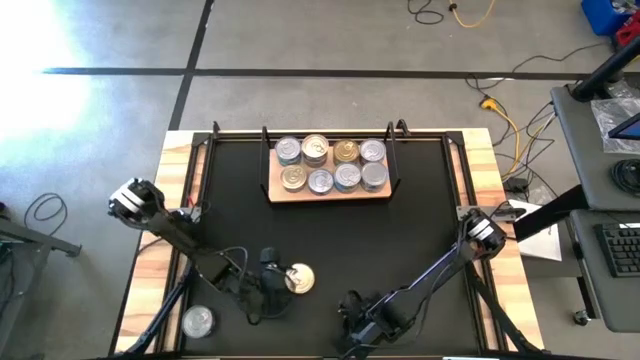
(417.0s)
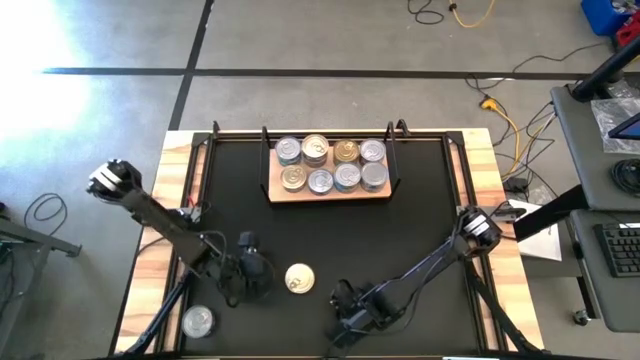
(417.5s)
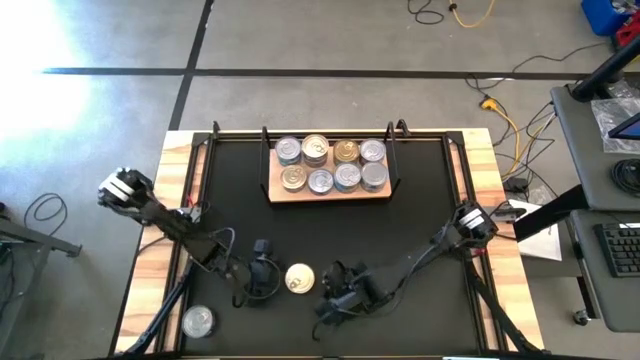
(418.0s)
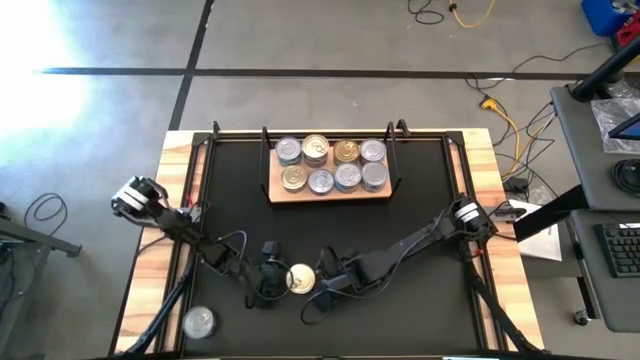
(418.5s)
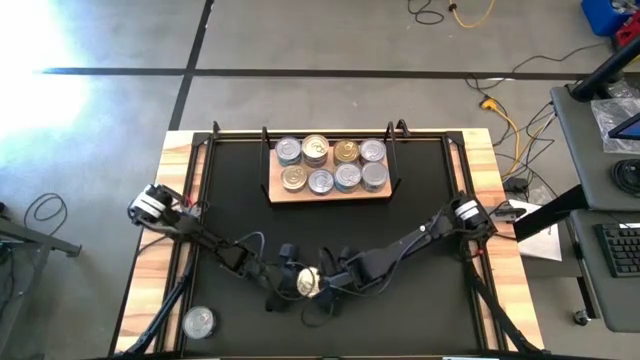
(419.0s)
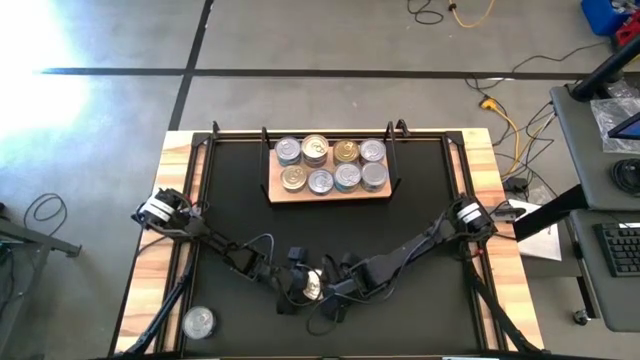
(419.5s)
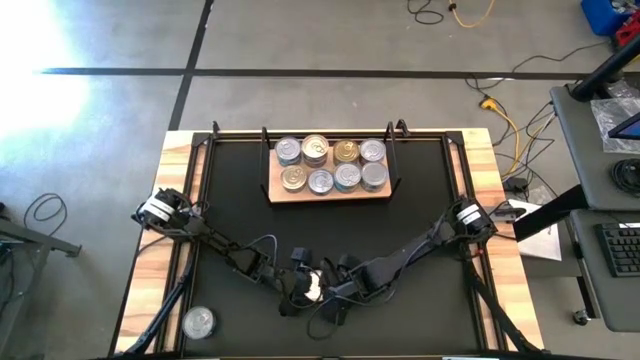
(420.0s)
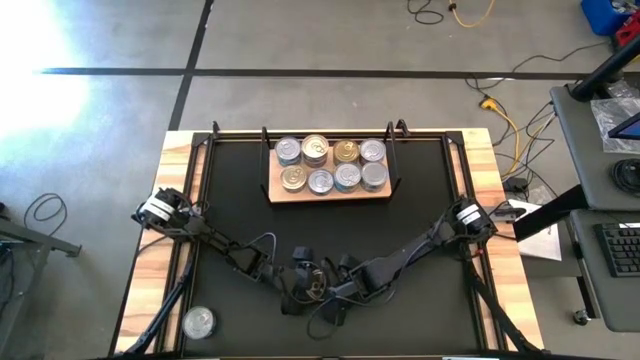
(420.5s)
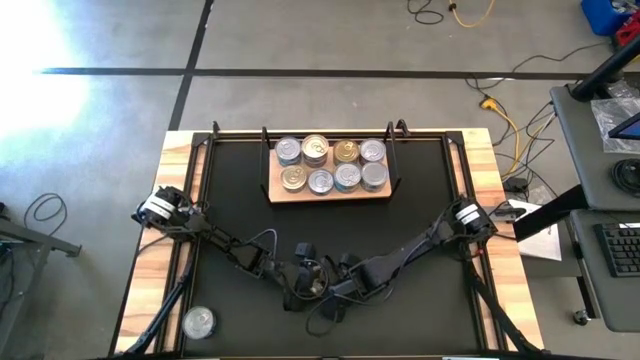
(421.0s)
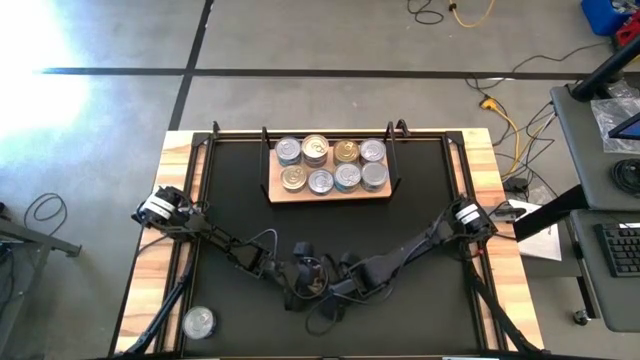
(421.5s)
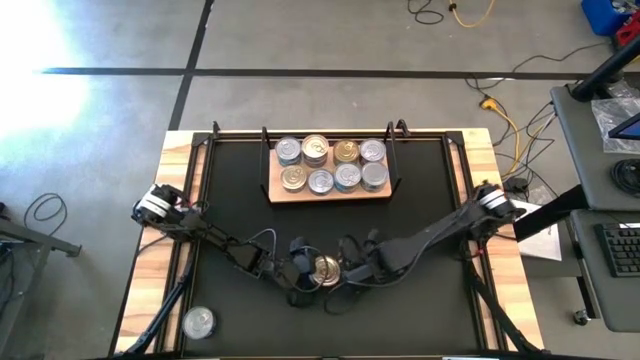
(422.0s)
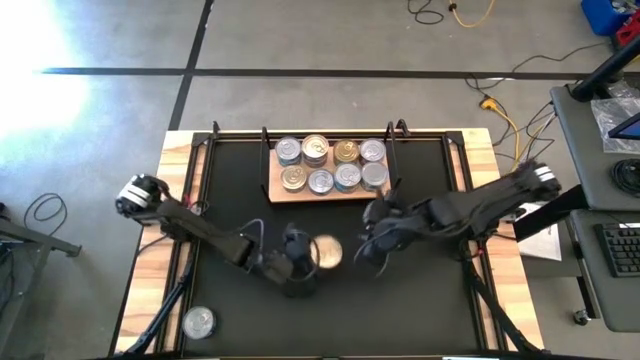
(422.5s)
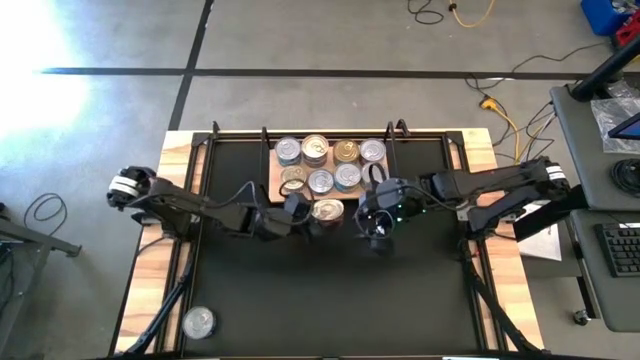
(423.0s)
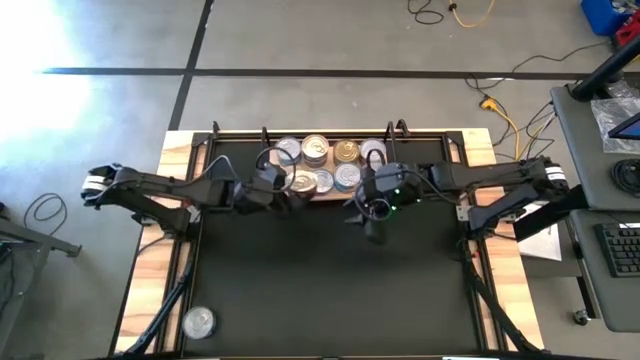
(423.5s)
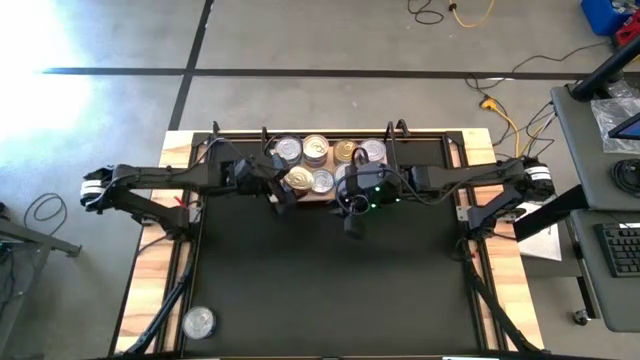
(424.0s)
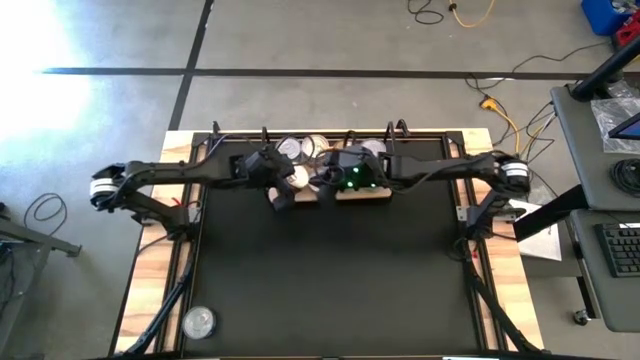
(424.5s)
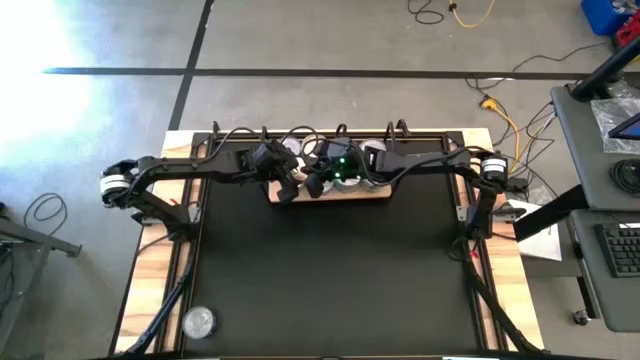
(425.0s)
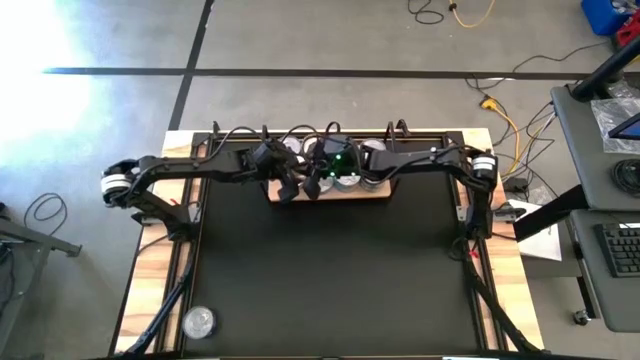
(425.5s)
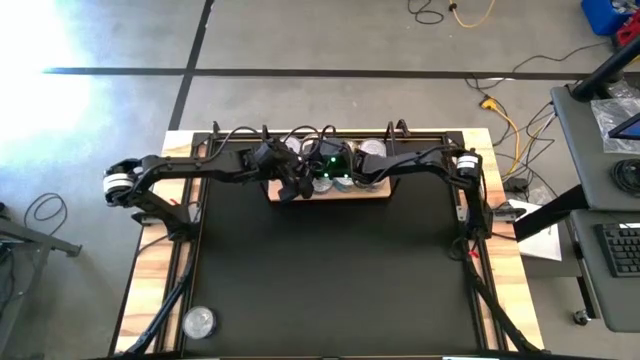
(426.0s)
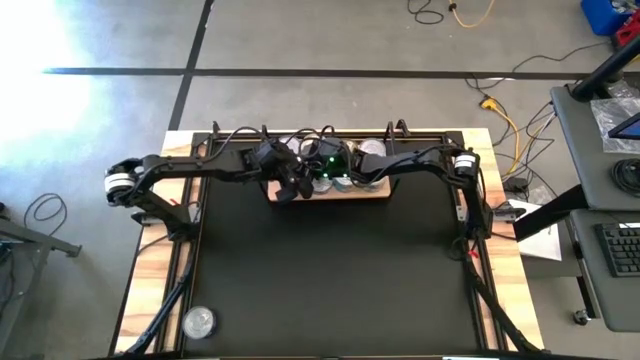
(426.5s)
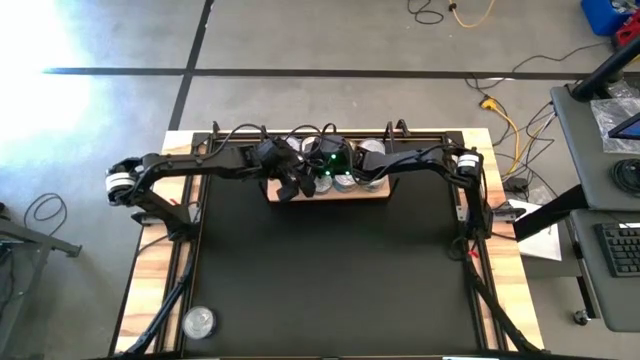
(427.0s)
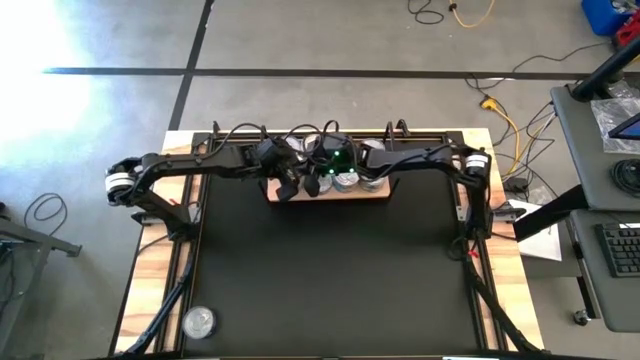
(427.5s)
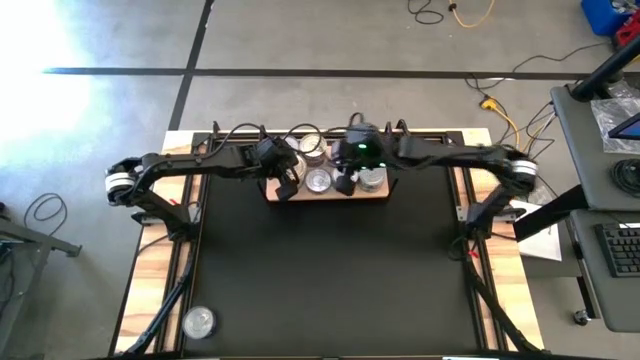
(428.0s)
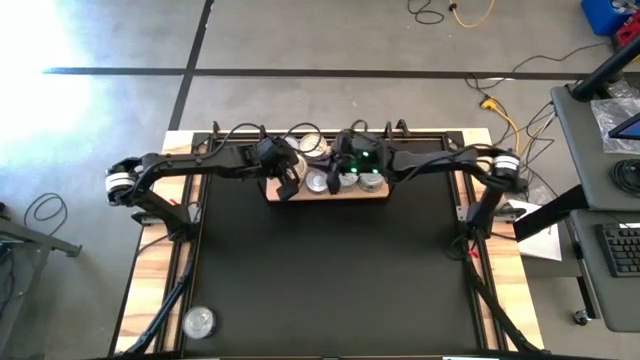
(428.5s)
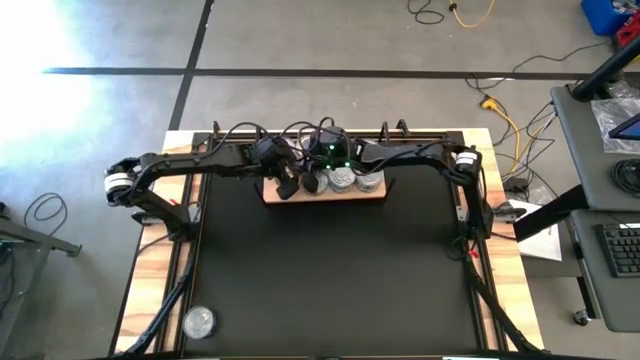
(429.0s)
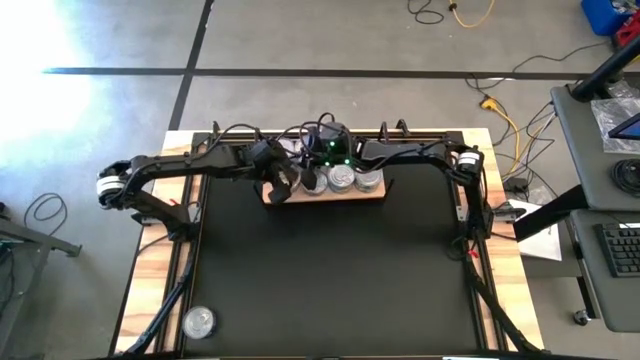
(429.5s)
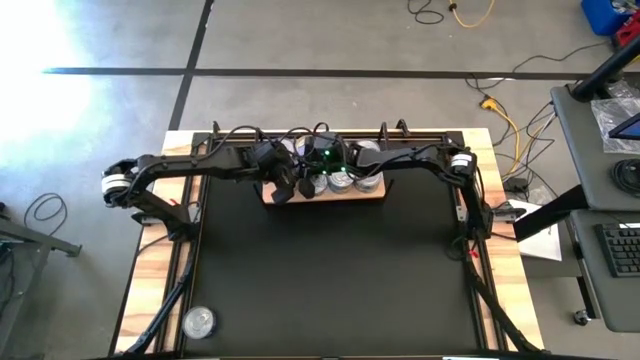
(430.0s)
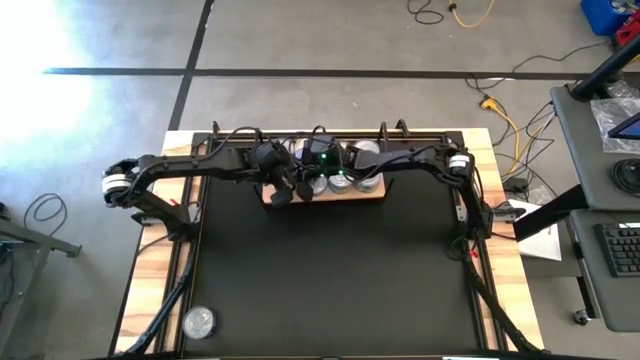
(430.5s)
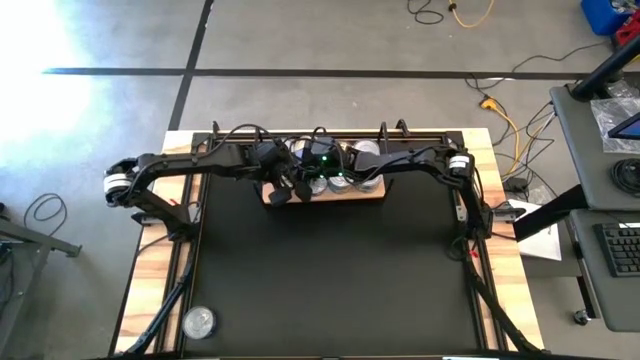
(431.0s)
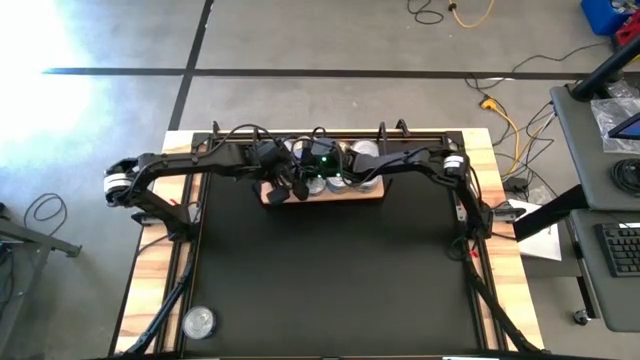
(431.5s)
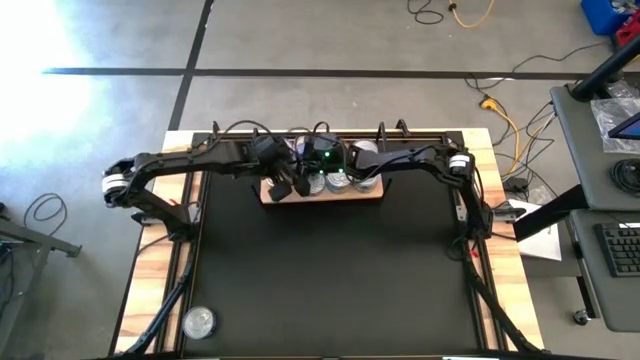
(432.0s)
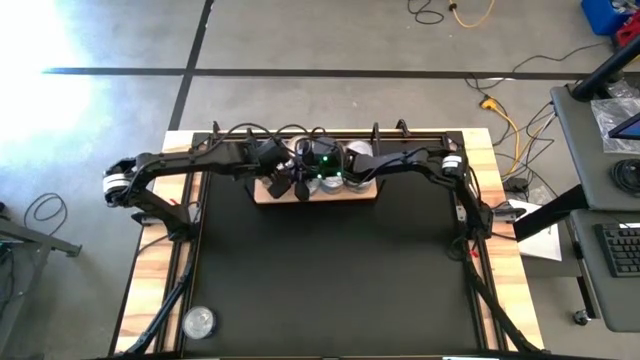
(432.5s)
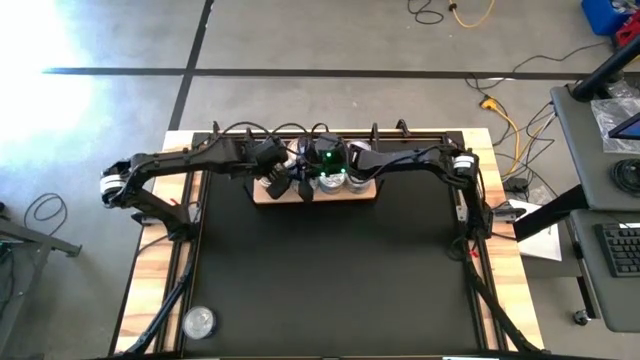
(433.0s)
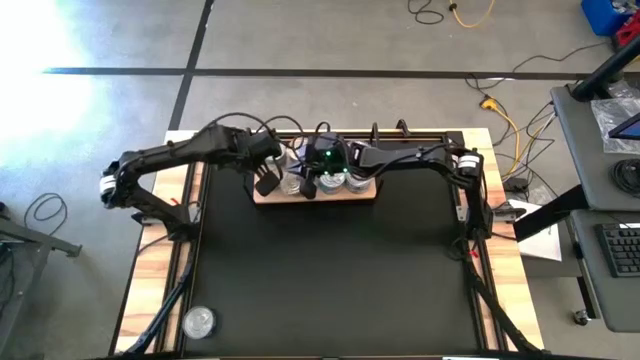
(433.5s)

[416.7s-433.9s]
Task: Stack canned seafood by type on shelf
Stack the blue-pink tuna can on top of the other blue-pink tuna can on the shelf
